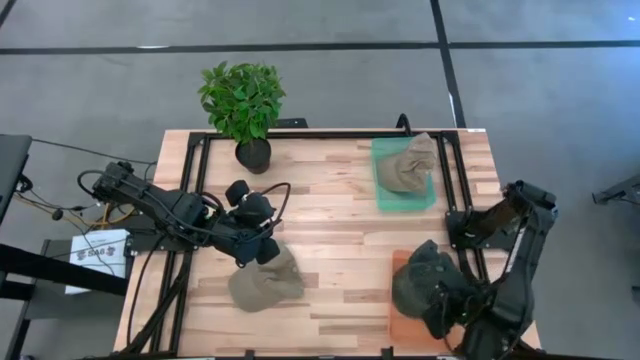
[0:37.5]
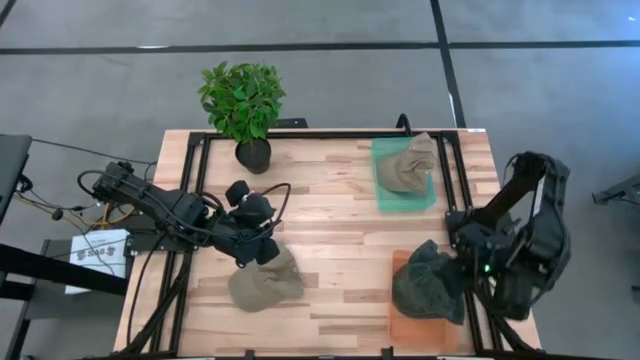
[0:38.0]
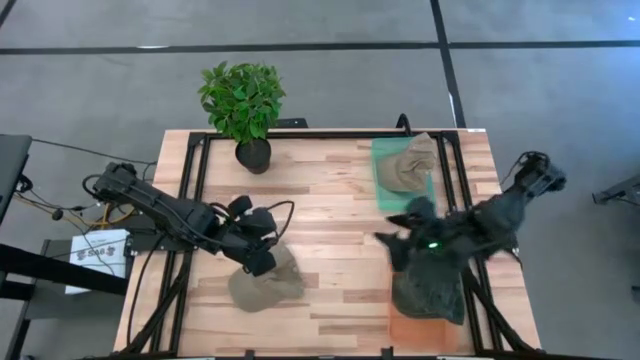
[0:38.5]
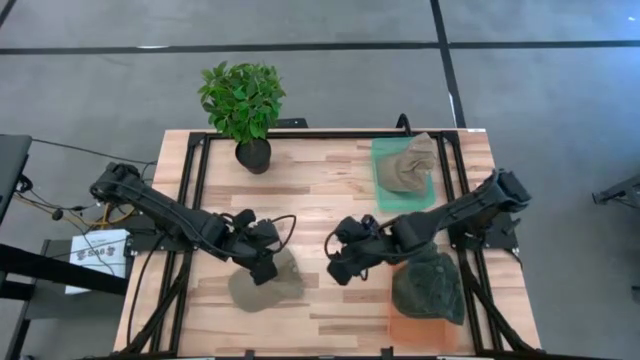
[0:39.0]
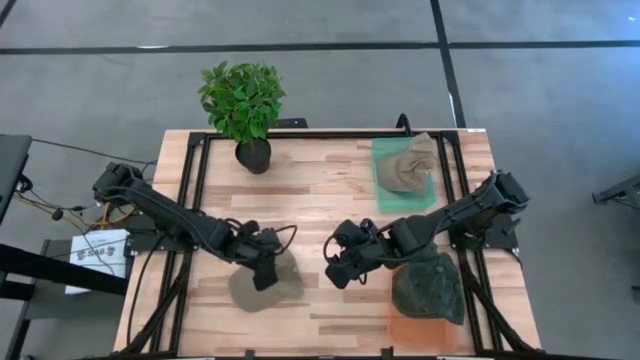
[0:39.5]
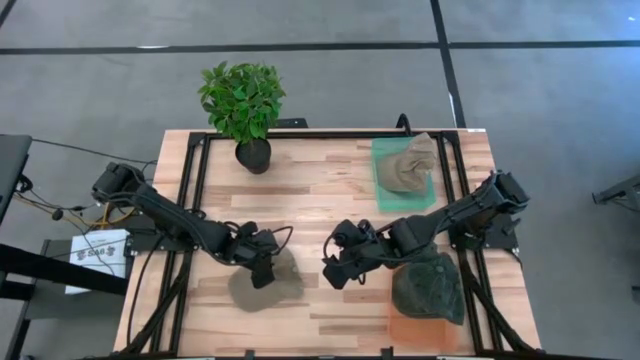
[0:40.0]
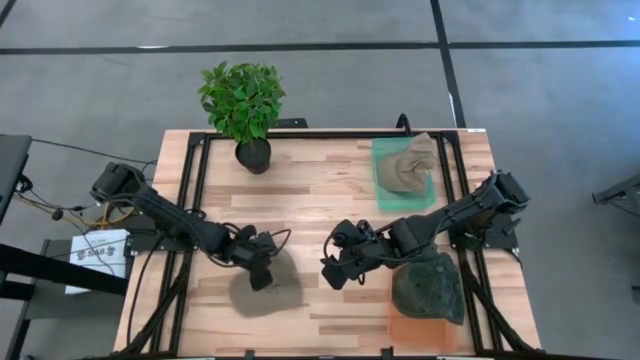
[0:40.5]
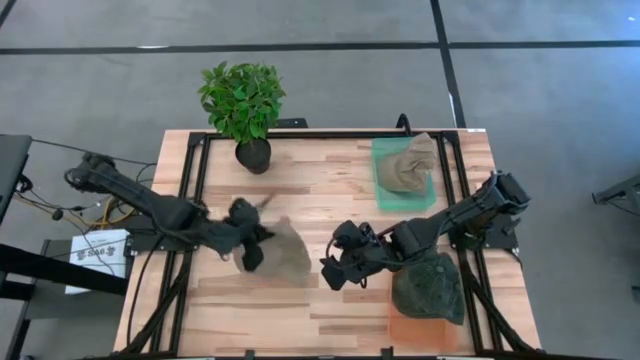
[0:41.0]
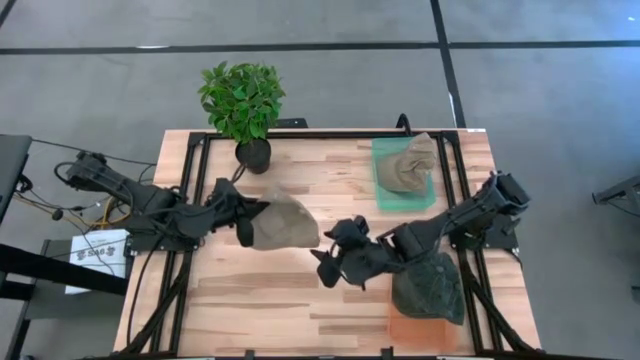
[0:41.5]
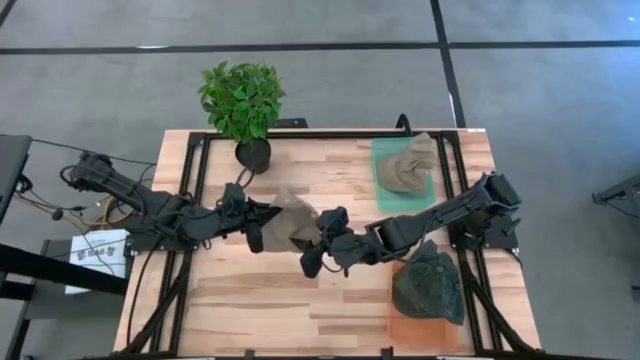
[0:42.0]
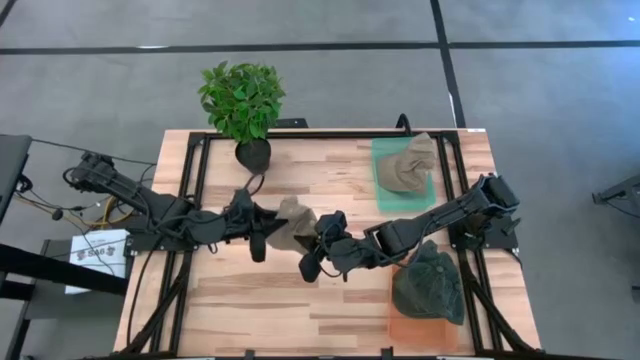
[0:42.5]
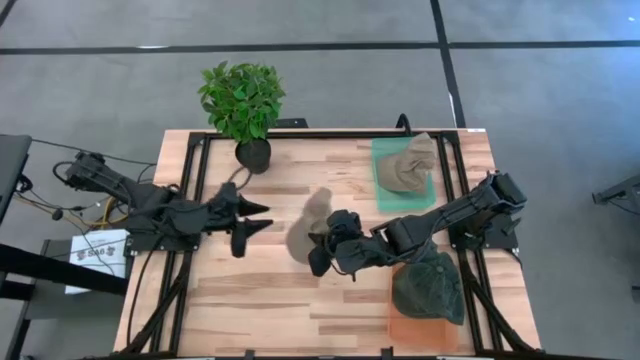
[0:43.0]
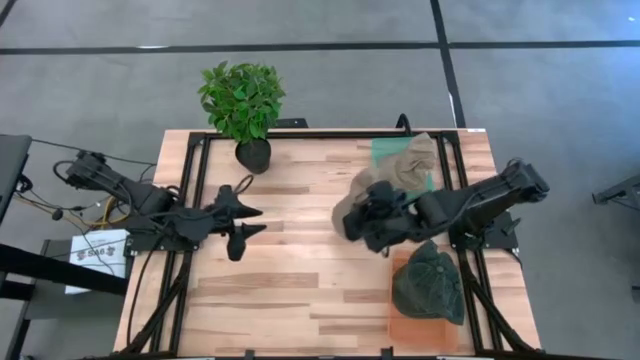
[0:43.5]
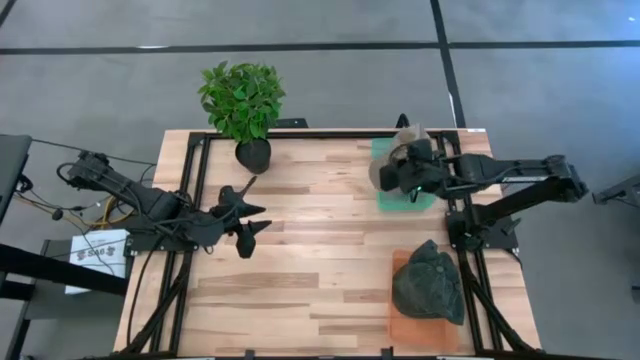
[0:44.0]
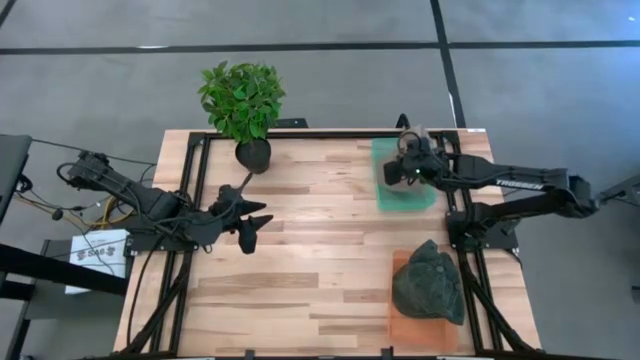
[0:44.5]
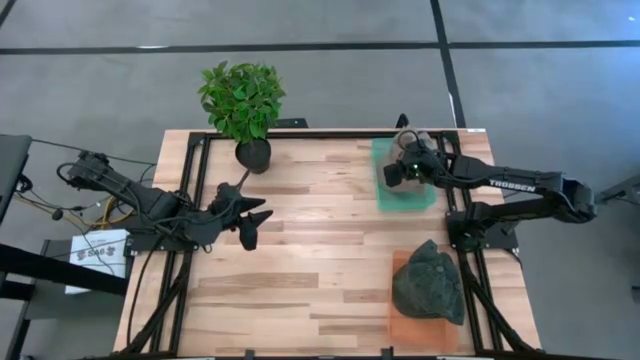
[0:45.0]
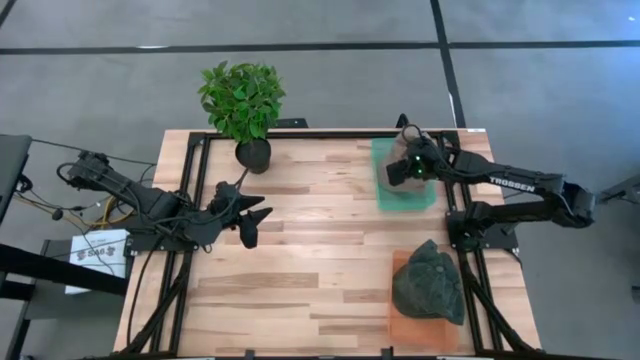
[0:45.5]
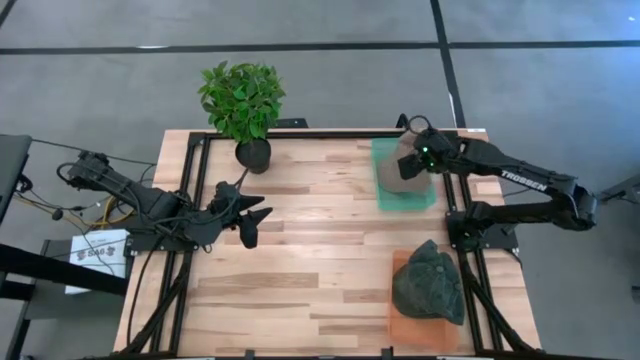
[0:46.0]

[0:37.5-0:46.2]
Task: Pick & Place hat
Put the brown cap into the green bin

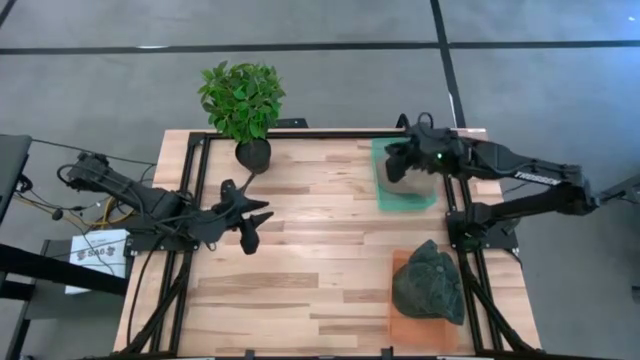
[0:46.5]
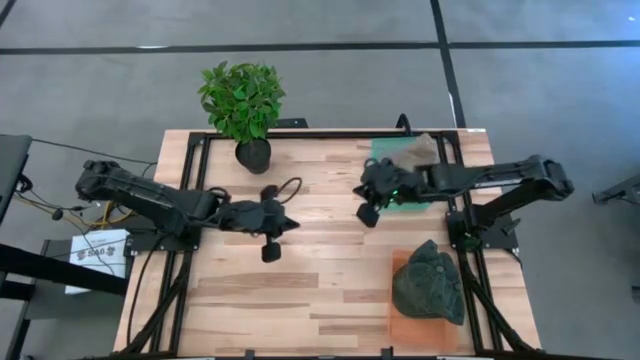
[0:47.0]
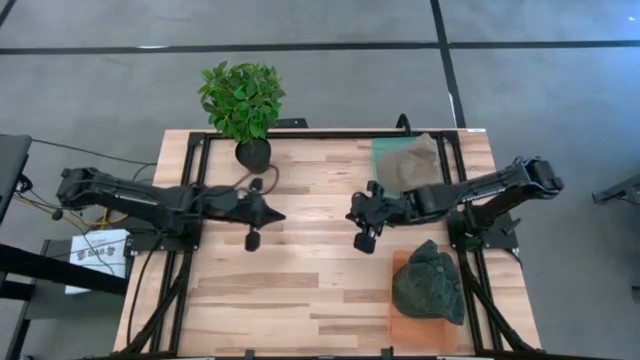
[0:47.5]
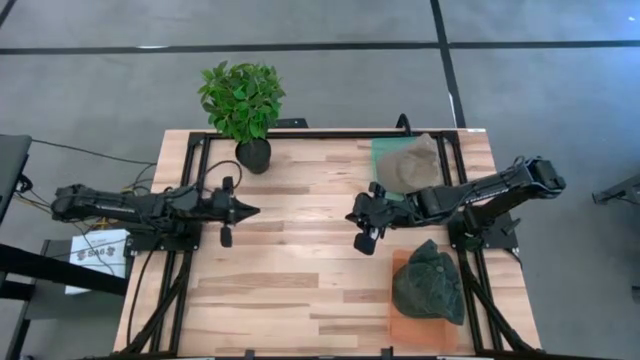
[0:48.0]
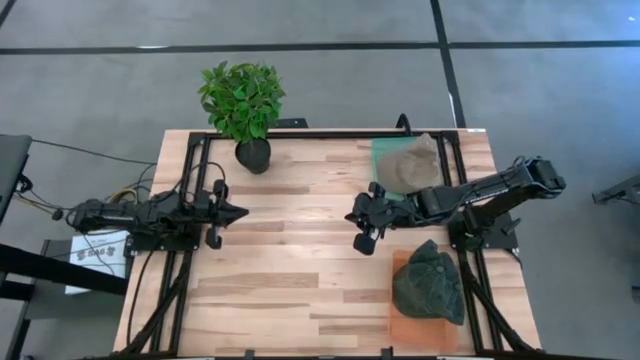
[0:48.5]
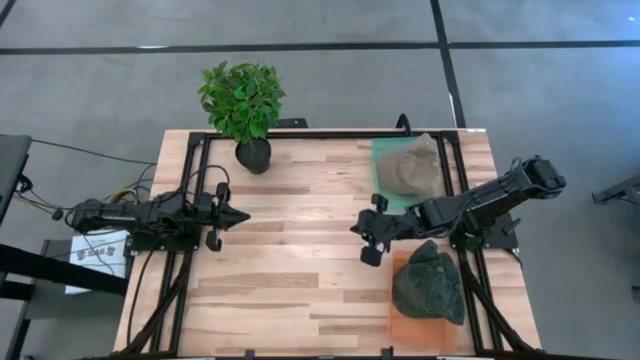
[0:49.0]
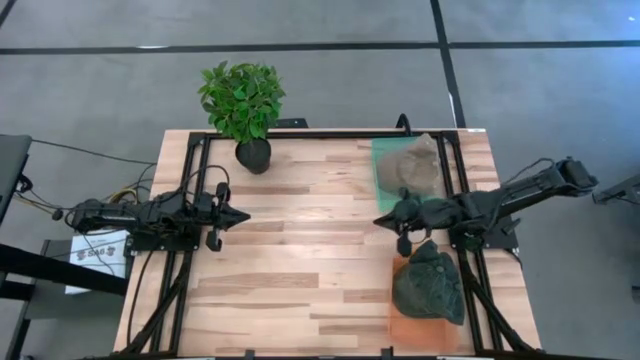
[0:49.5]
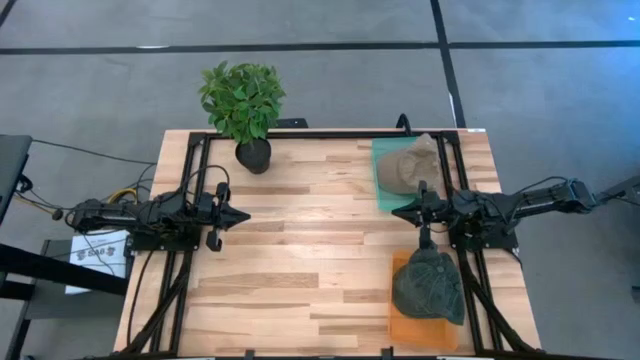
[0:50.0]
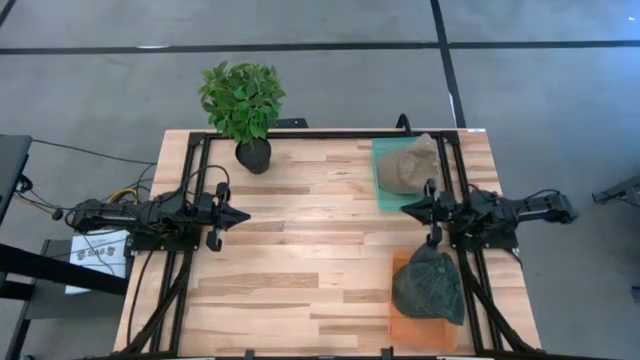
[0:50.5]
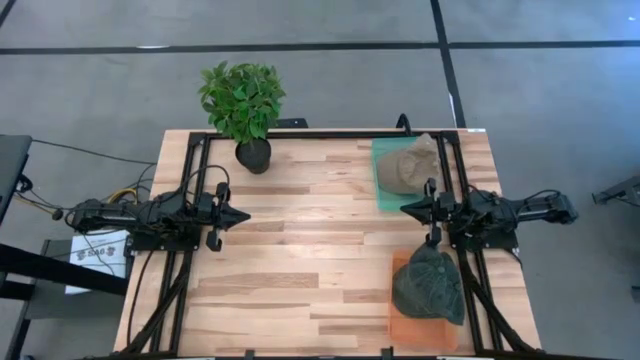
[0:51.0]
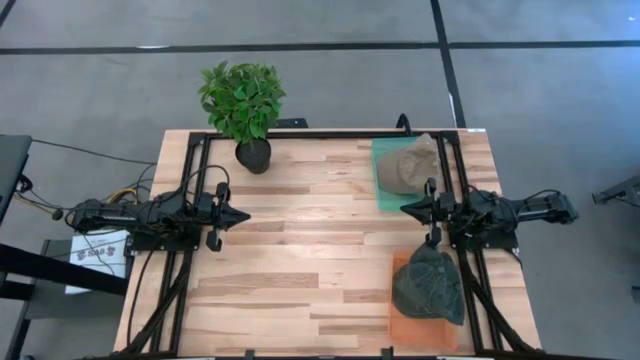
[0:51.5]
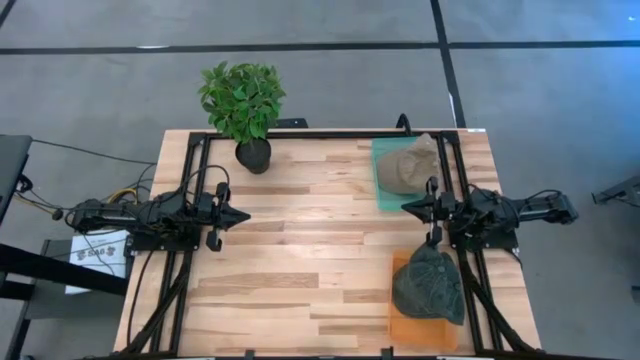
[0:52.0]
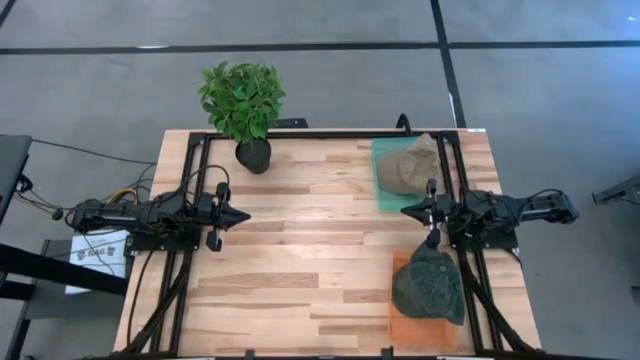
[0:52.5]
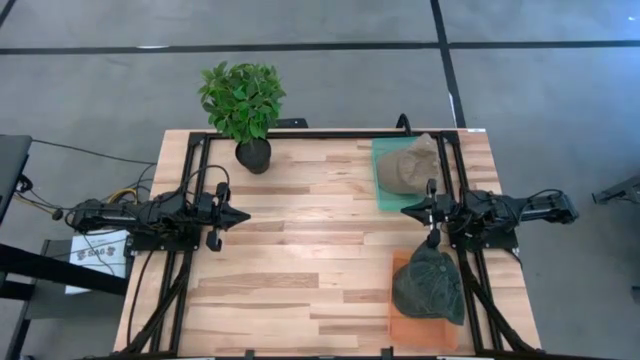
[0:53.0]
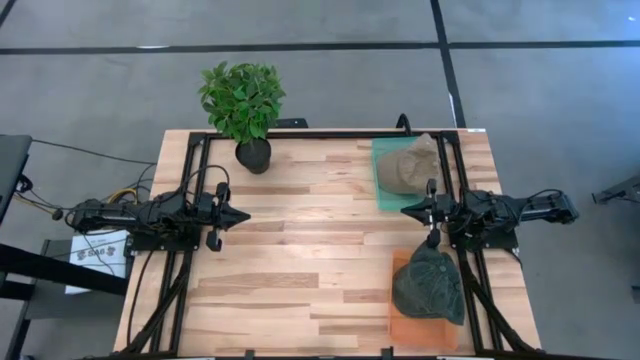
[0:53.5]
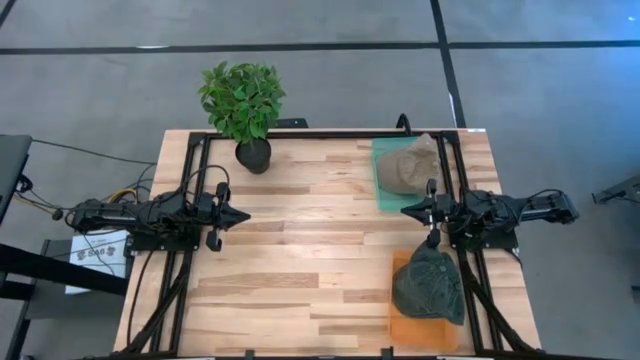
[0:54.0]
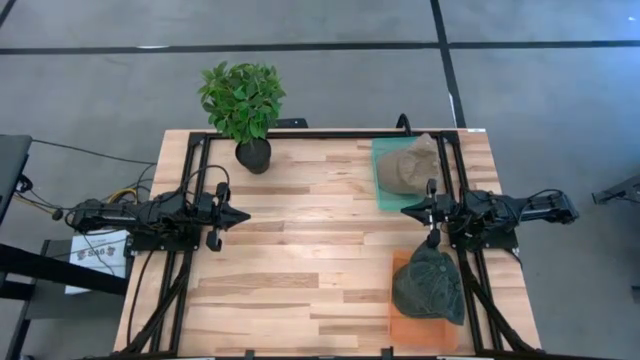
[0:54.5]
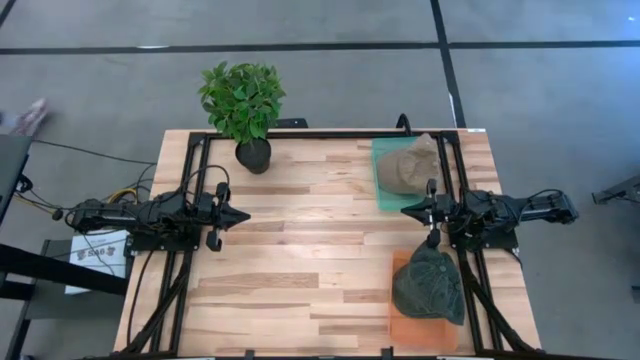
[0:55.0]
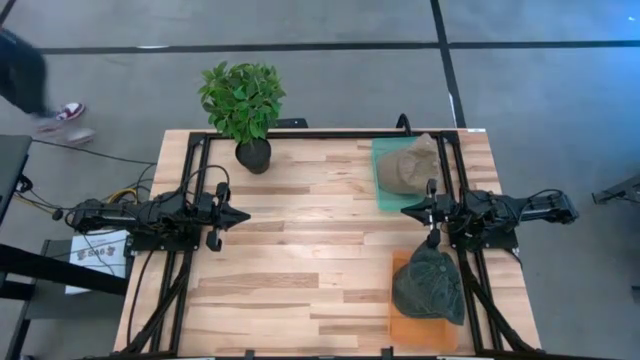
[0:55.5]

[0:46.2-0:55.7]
Return to Home Position
